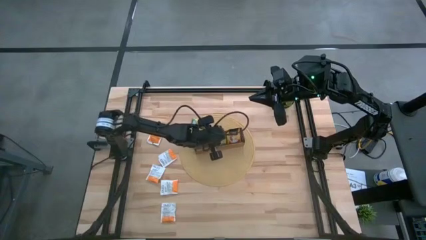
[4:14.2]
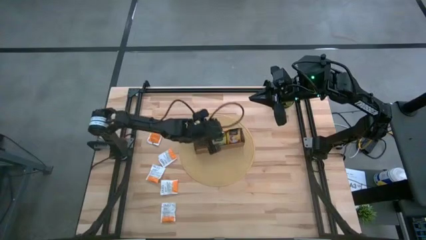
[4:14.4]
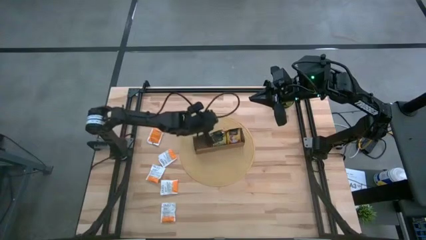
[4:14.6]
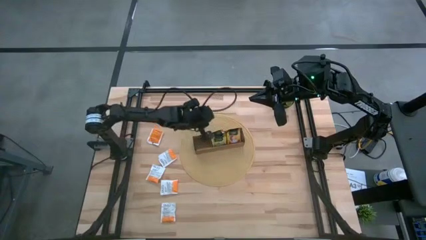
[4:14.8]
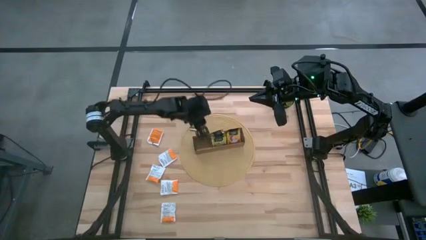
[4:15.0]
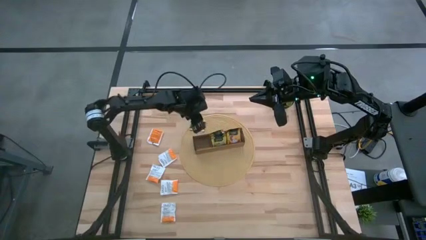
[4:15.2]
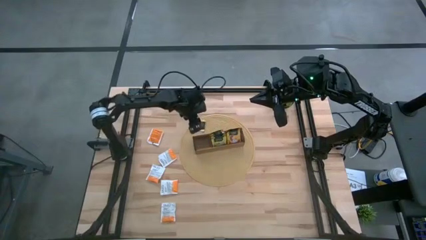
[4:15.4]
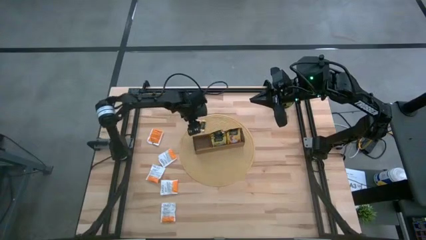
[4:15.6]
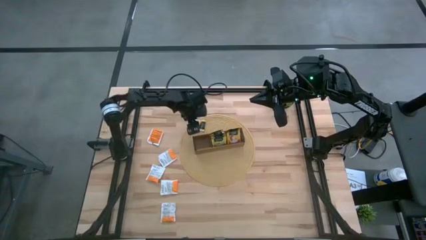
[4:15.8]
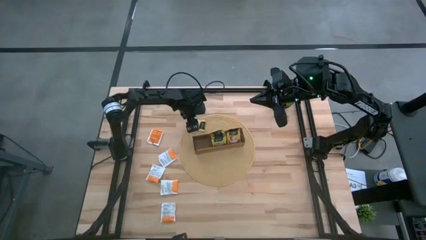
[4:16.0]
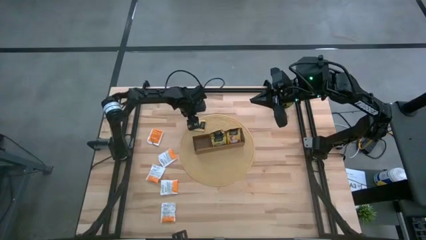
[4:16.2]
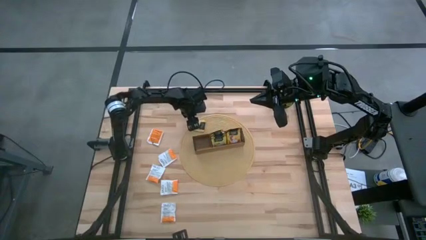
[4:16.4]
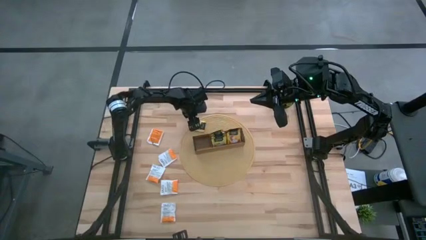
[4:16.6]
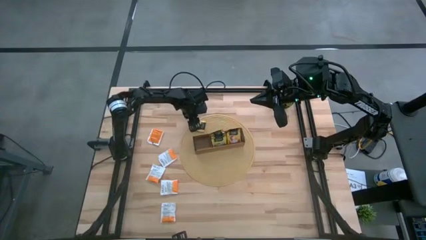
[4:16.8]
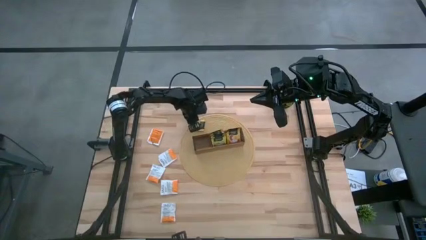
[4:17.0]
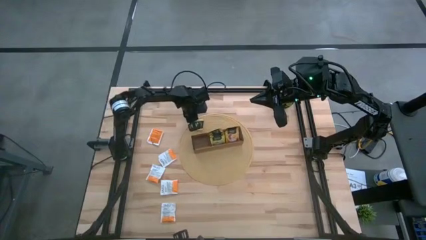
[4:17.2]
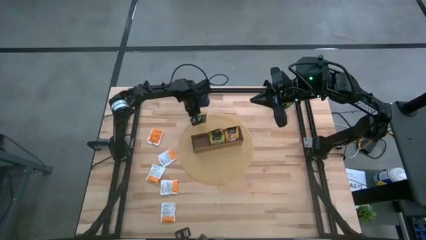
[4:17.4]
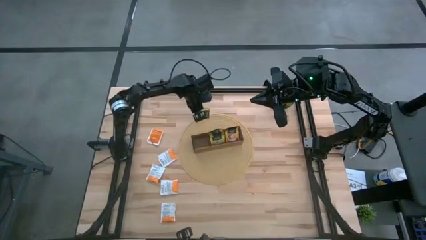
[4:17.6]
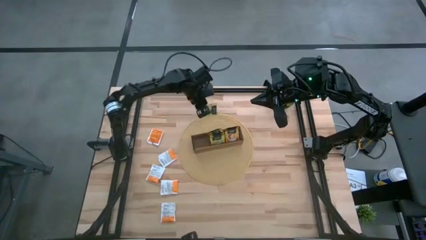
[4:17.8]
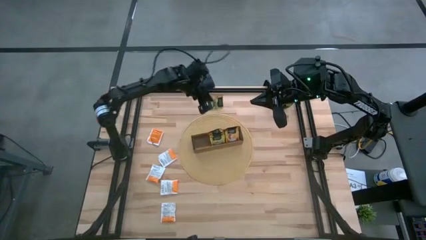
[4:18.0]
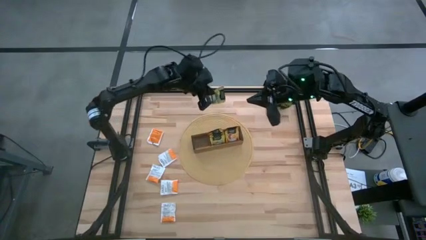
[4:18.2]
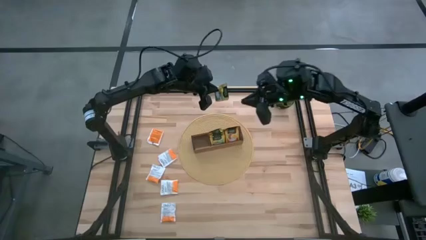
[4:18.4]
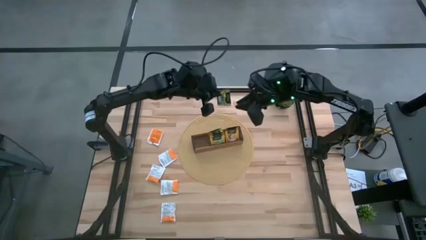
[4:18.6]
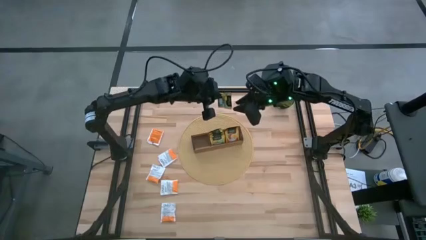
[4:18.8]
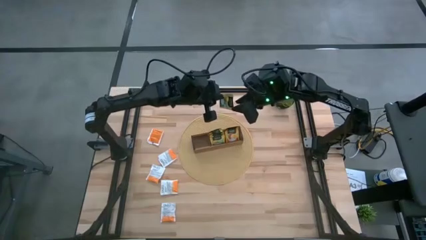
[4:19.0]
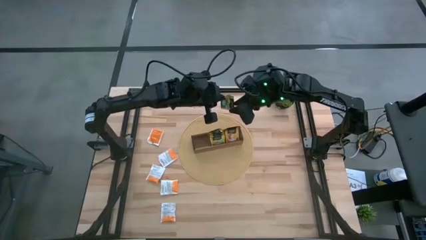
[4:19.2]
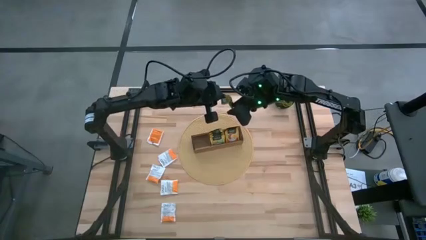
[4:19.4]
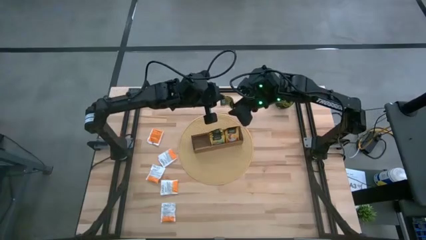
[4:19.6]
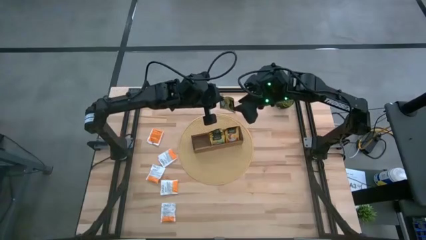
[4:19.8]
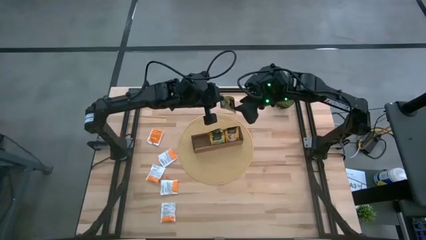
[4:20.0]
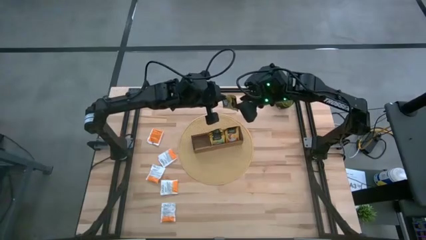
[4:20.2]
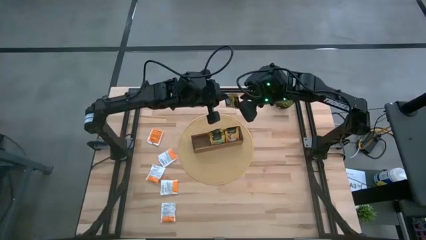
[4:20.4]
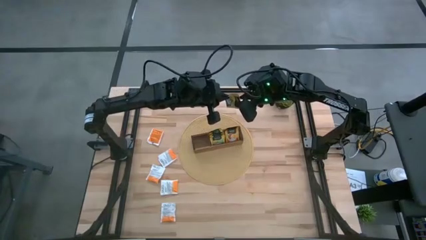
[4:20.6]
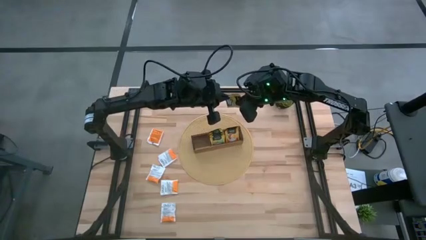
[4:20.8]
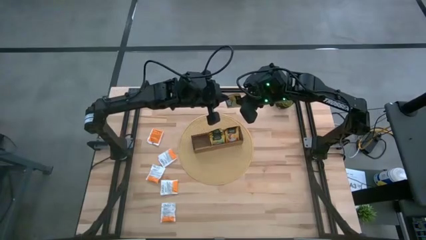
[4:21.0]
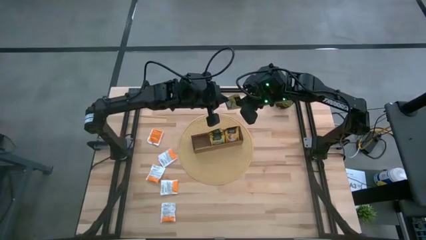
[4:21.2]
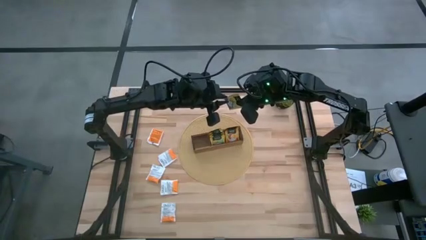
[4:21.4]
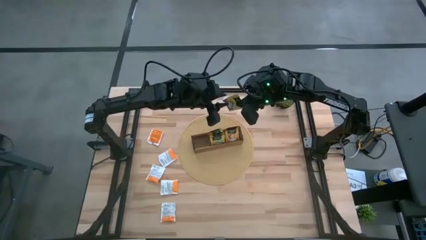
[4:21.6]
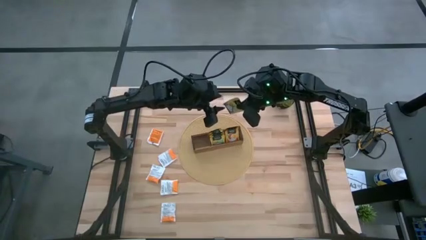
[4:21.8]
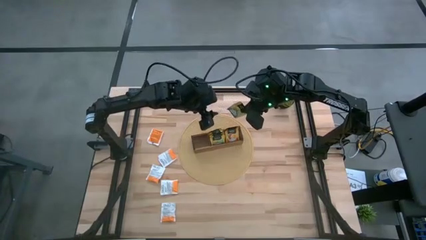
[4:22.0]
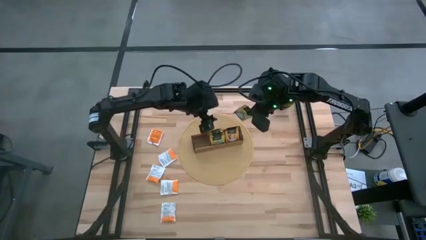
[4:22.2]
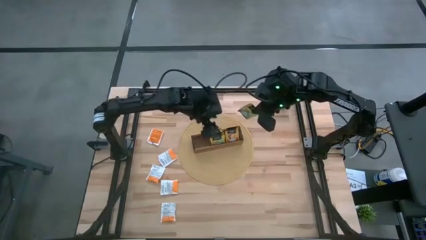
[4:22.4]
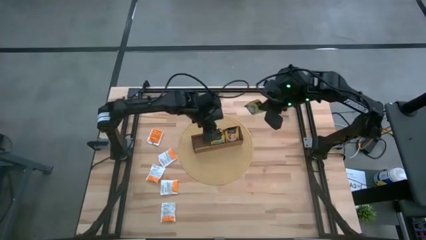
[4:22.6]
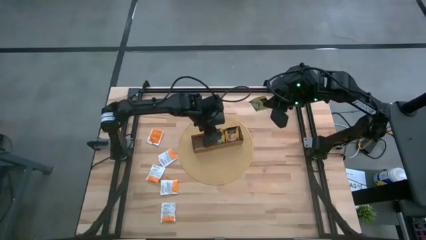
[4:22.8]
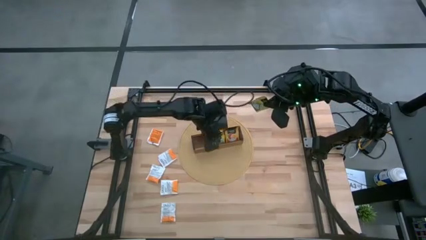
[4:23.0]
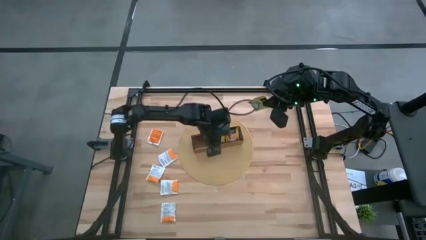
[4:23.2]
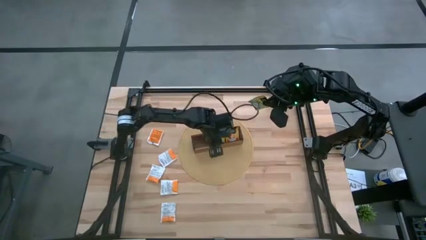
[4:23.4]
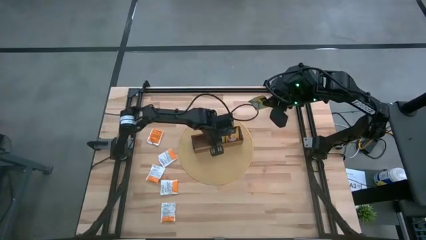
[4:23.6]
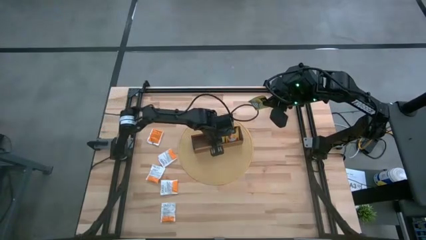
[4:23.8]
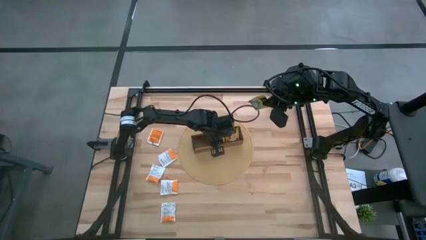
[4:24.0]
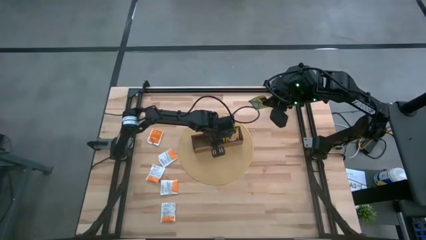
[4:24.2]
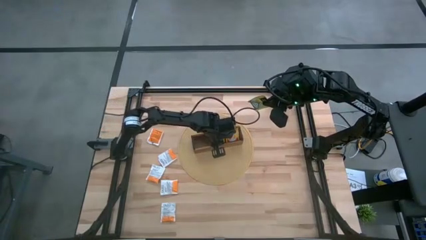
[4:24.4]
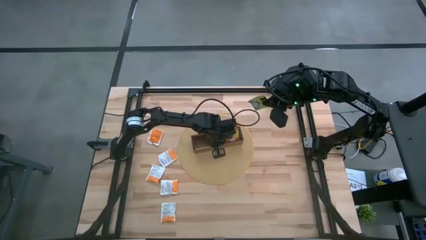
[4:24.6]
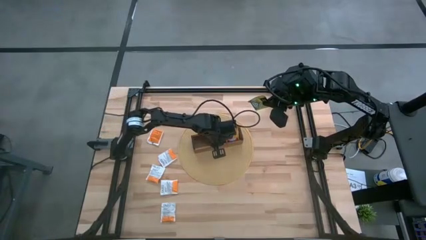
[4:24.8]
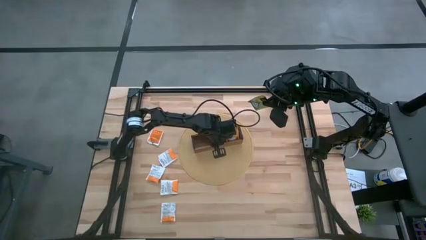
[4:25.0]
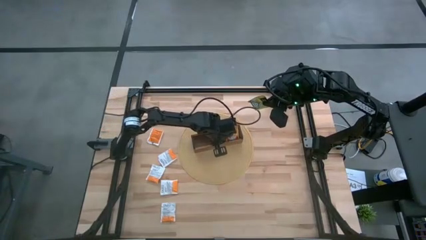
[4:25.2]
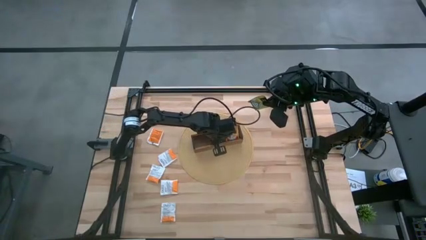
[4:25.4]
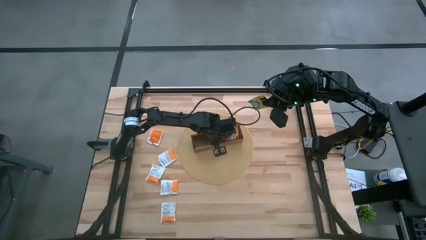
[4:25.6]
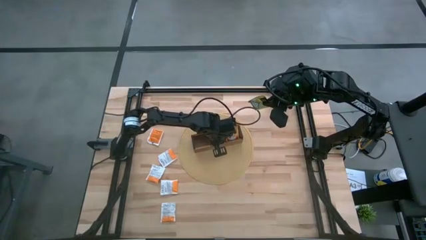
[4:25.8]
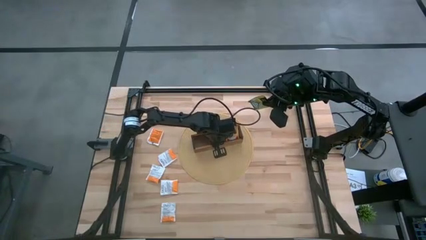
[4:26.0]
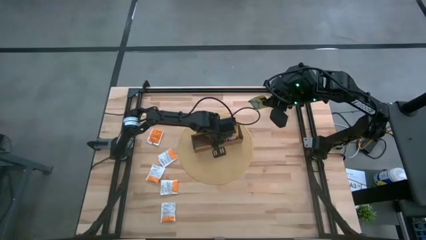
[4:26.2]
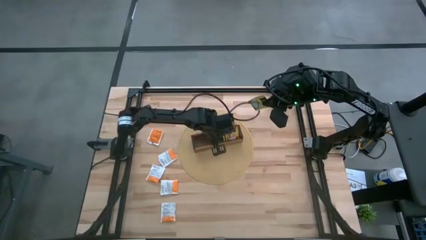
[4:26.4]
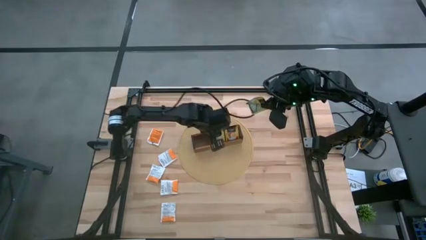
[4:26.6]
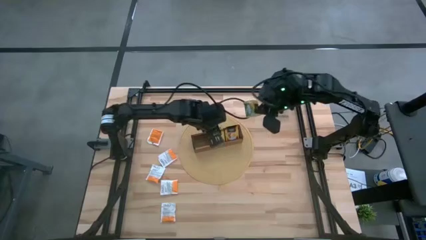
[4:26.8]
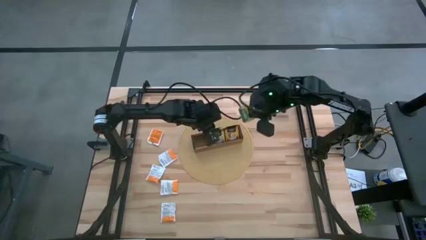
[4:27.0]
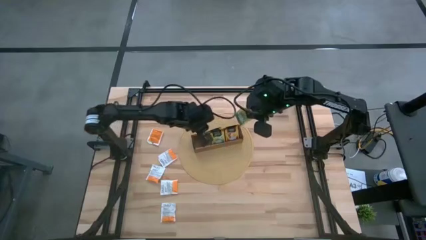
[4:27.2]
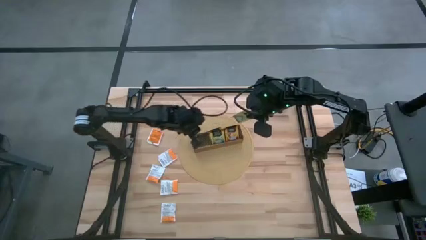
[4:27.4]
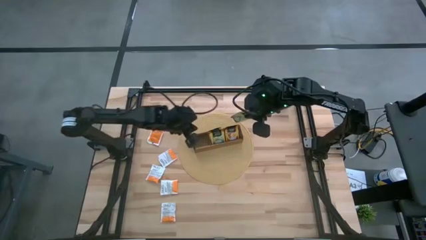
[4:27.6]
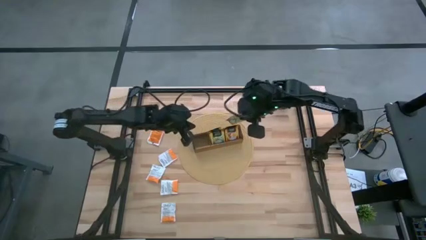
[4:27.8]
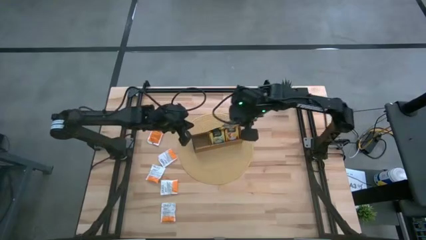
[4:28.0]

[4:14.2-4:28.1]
Task: Pick & Place Tea
Put the yellow tea bag into the middle section of the wooden organizer

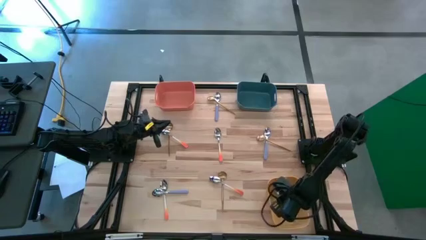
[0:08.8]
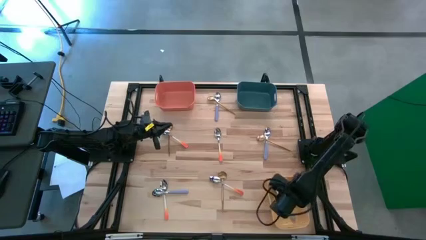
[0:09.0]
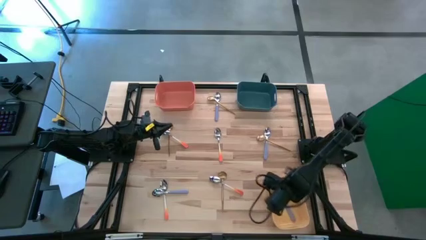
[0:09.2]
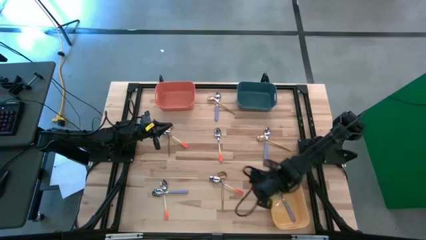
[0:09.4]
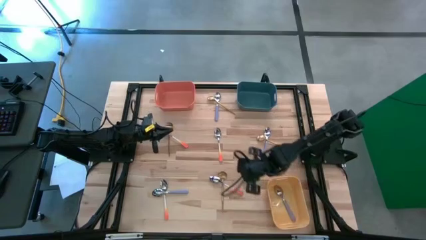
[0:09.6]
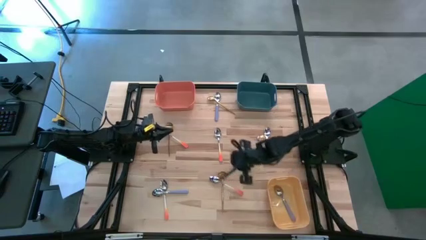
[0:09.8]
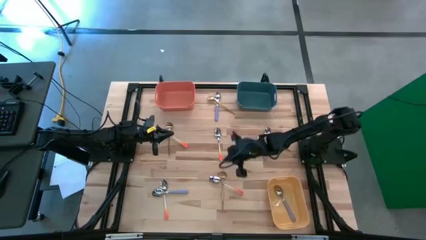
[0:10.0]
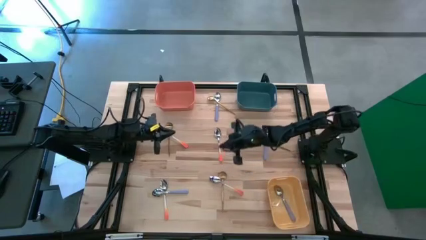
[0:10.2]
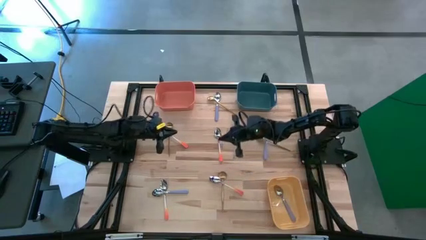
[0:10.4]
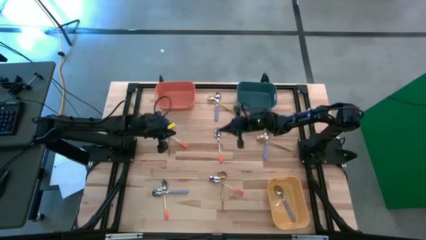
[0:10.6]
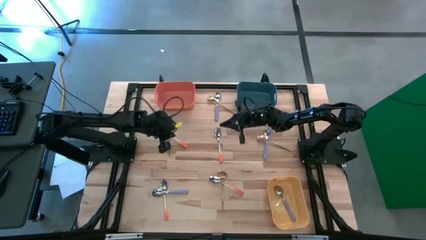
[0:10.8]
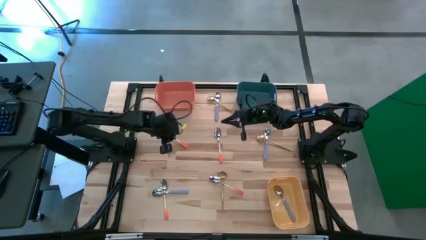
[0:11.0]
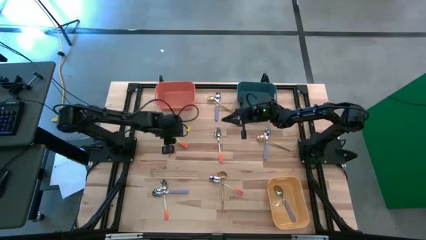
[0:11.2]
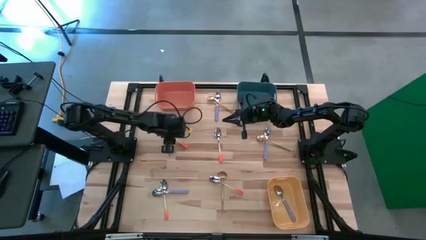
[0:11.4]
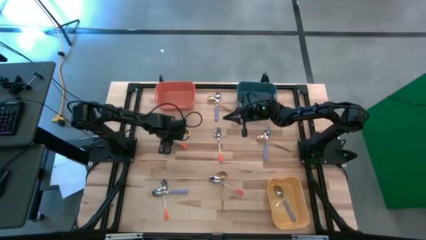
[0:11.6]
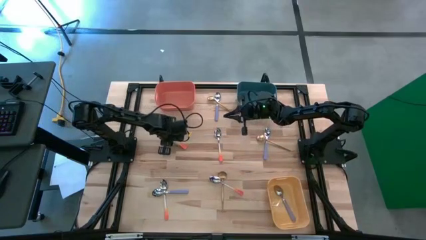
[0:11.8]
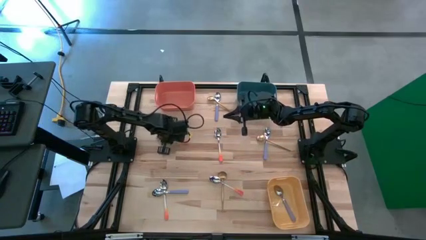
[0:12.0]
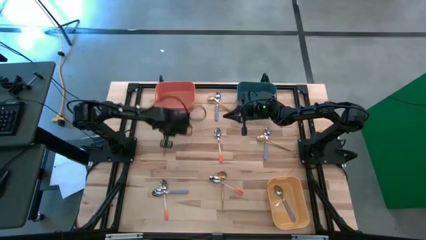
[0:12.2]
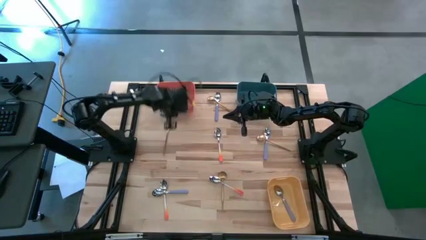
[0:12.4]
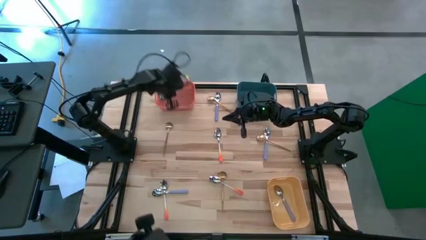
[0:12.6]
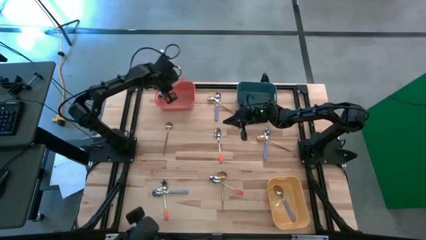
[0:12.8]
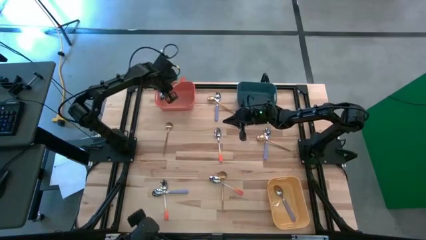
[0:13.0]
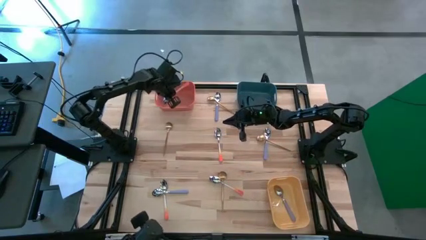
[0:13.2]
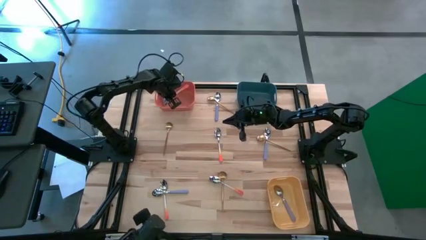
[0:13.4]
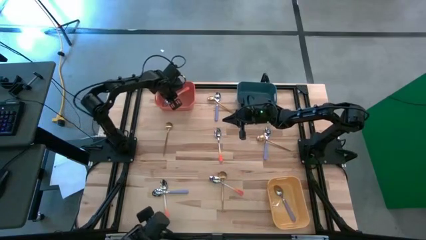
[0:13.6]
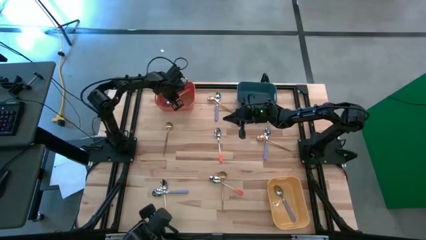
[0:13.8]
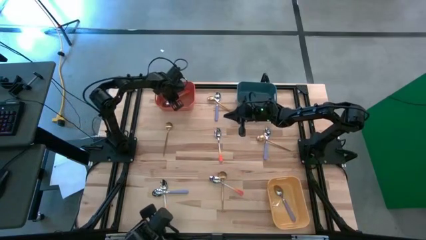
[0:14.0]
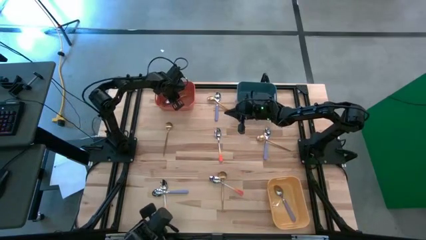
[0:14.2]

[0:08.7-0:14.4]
Task: Sort silverware by color (type)
Put the orange spoon into the orange bin
